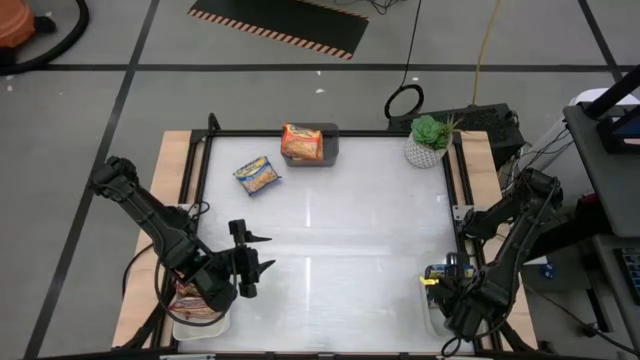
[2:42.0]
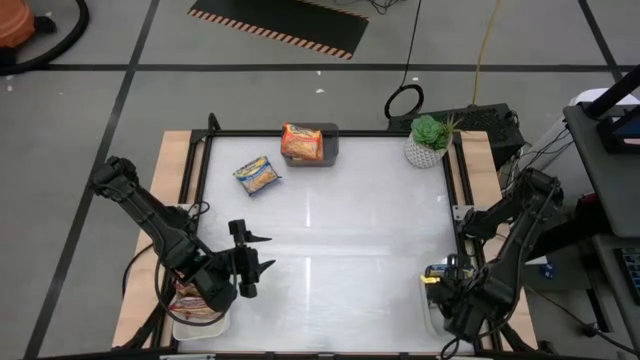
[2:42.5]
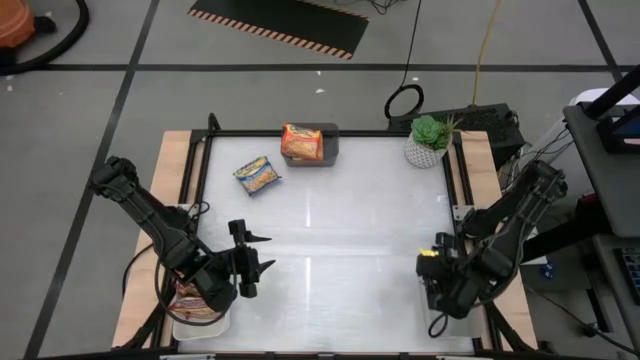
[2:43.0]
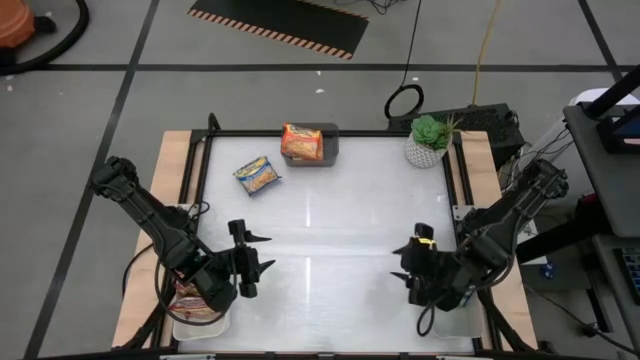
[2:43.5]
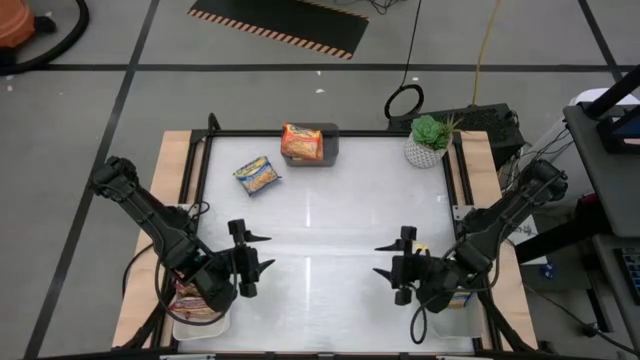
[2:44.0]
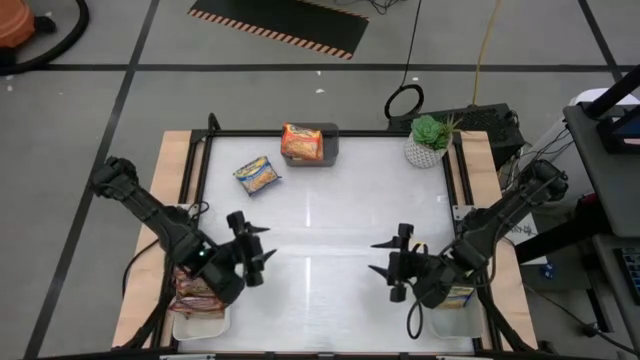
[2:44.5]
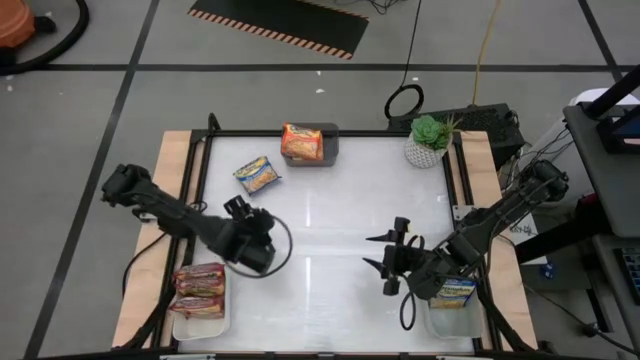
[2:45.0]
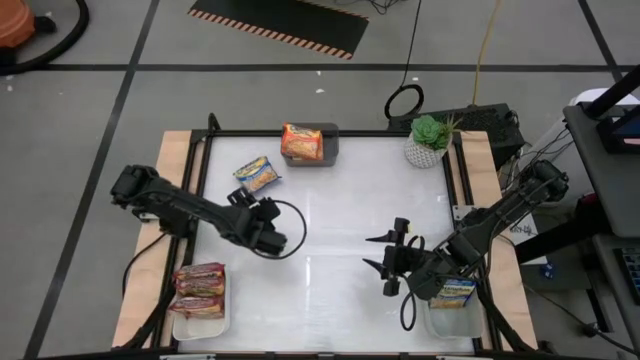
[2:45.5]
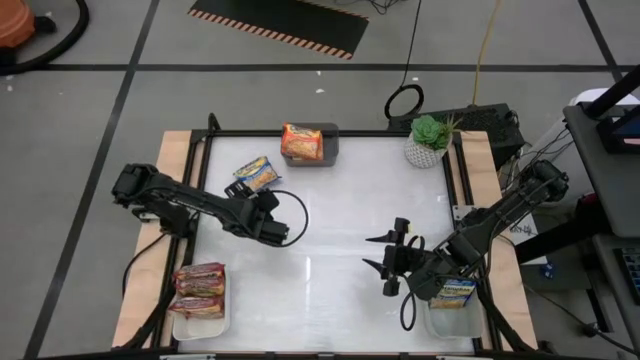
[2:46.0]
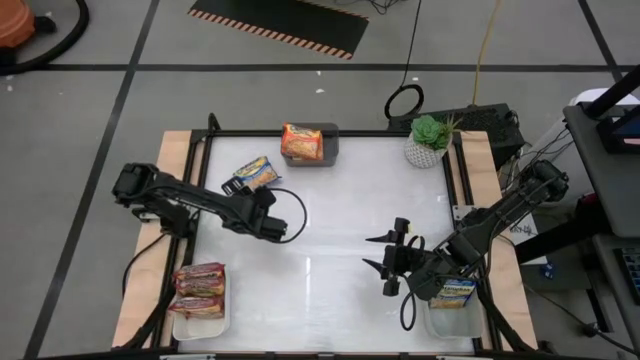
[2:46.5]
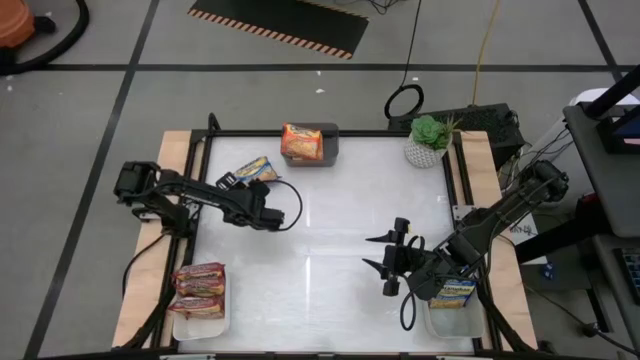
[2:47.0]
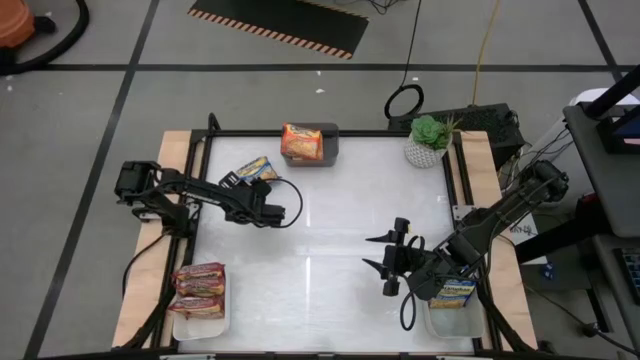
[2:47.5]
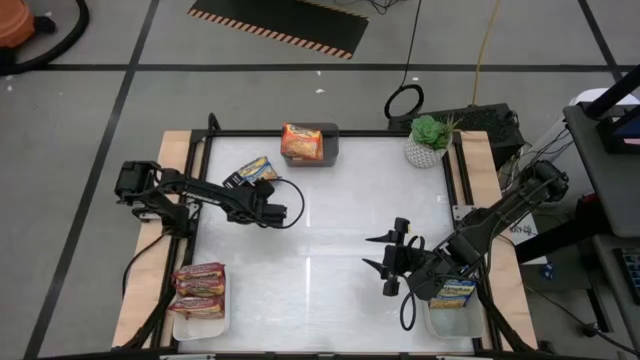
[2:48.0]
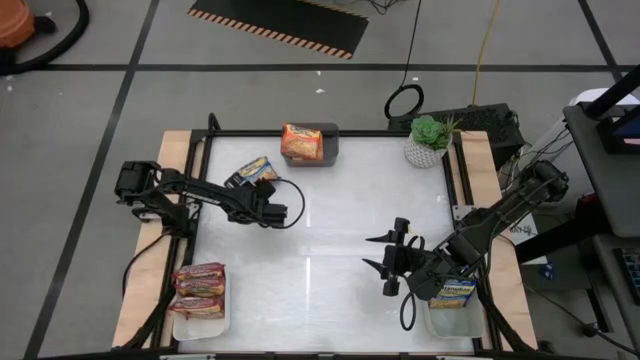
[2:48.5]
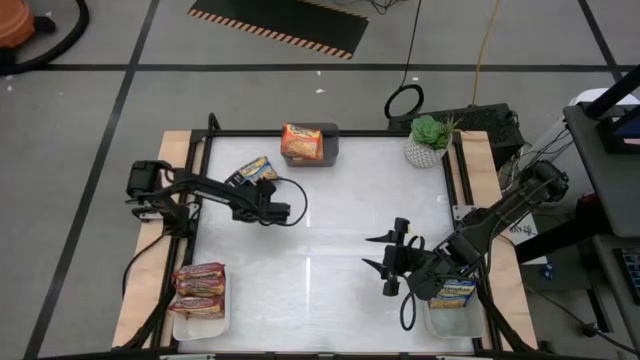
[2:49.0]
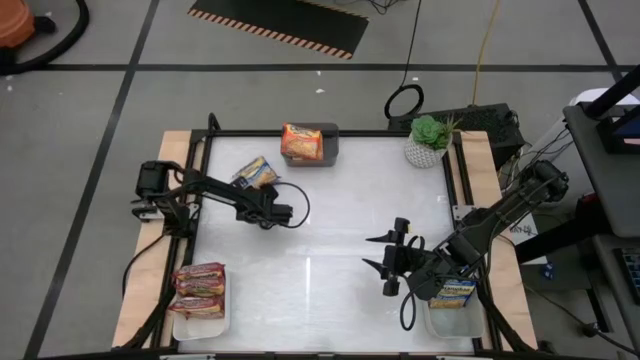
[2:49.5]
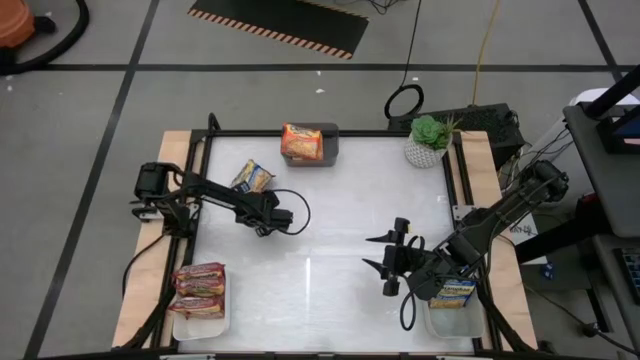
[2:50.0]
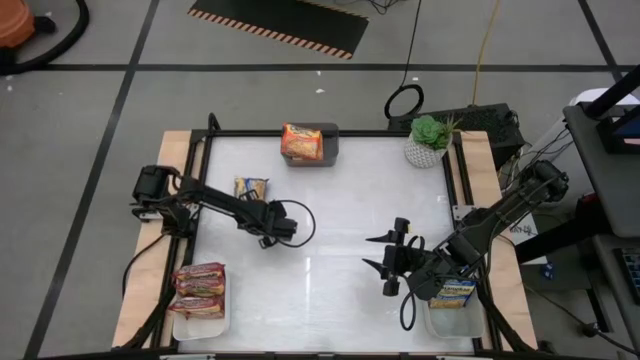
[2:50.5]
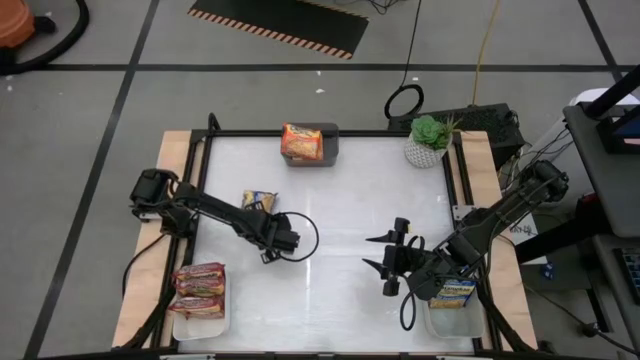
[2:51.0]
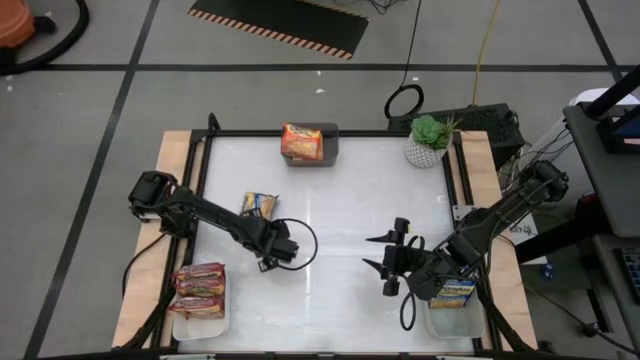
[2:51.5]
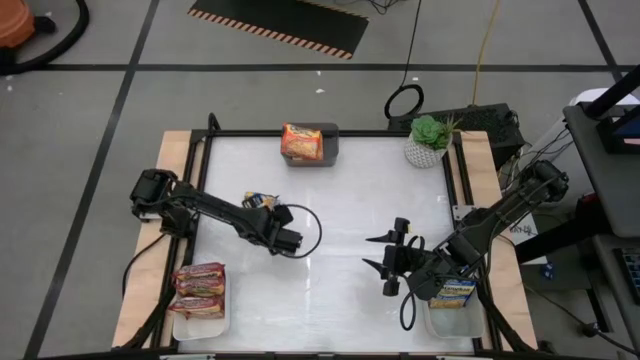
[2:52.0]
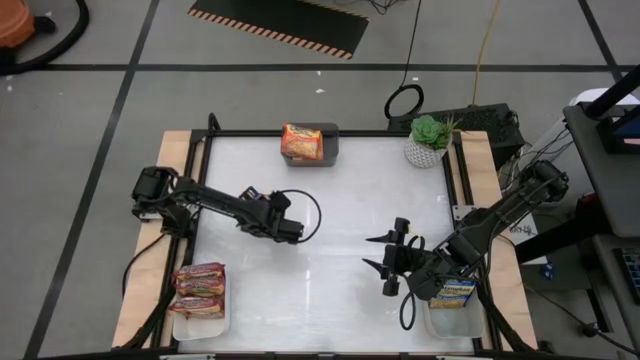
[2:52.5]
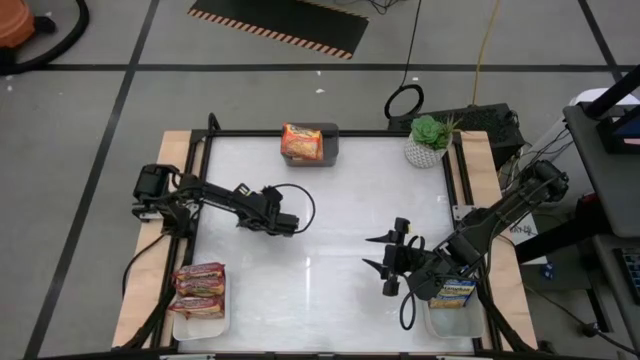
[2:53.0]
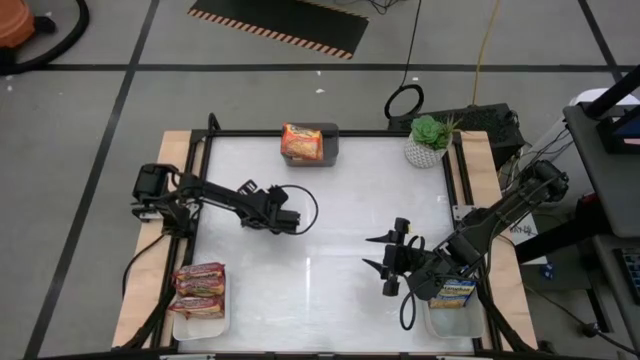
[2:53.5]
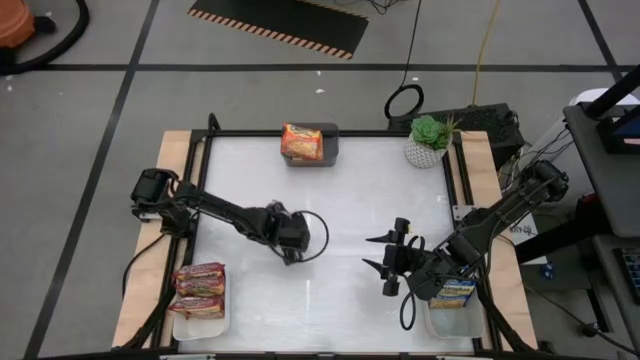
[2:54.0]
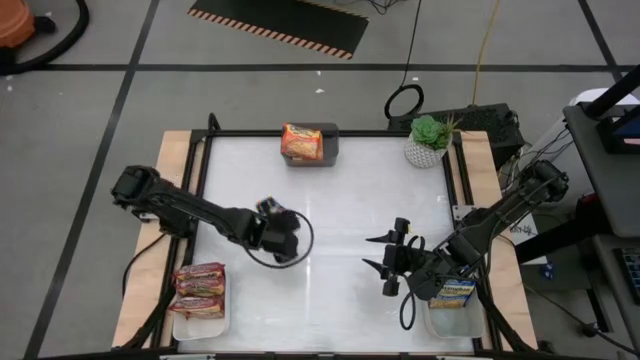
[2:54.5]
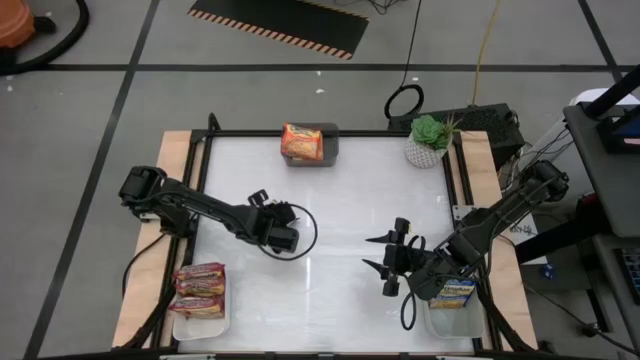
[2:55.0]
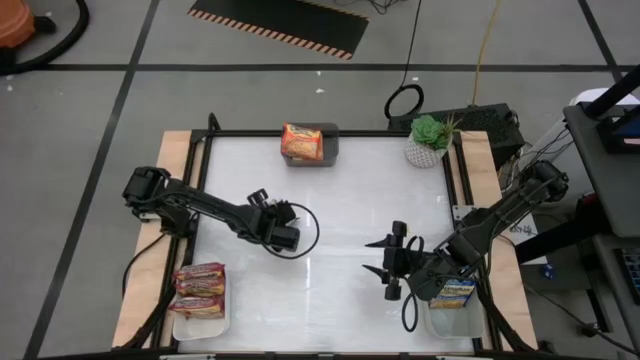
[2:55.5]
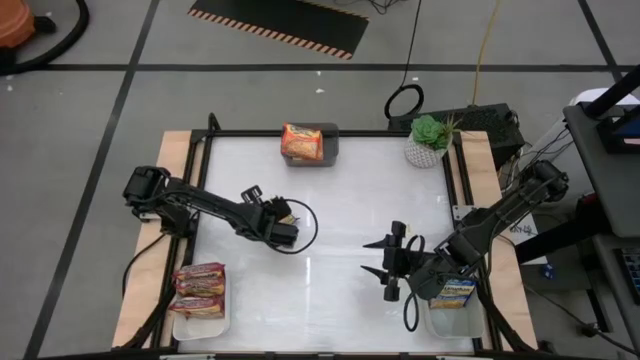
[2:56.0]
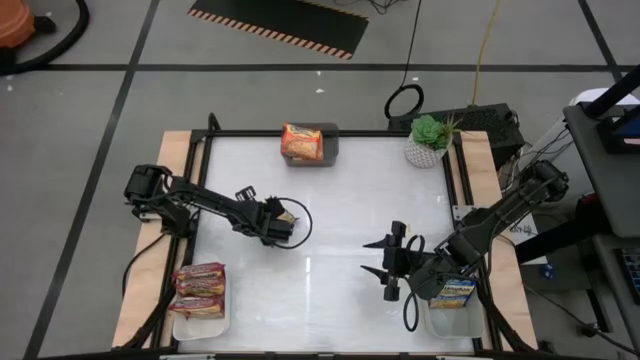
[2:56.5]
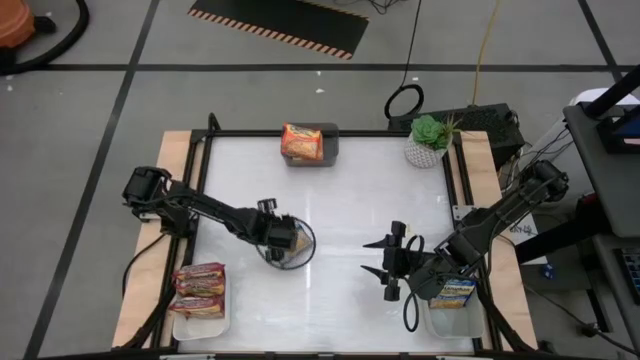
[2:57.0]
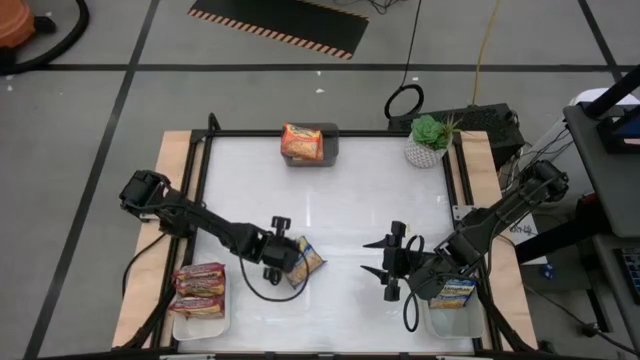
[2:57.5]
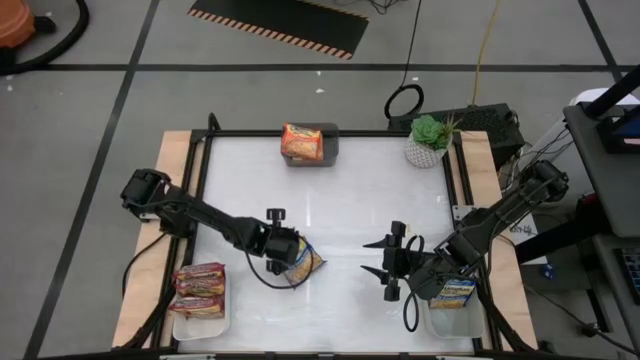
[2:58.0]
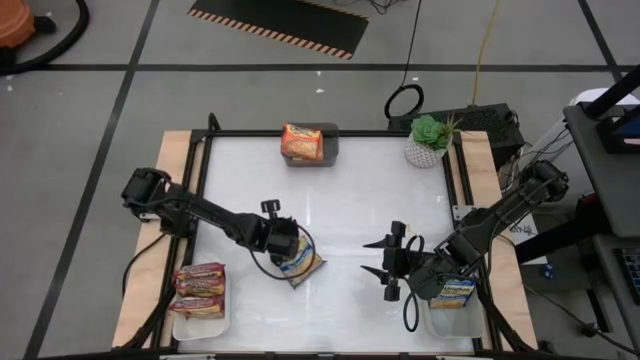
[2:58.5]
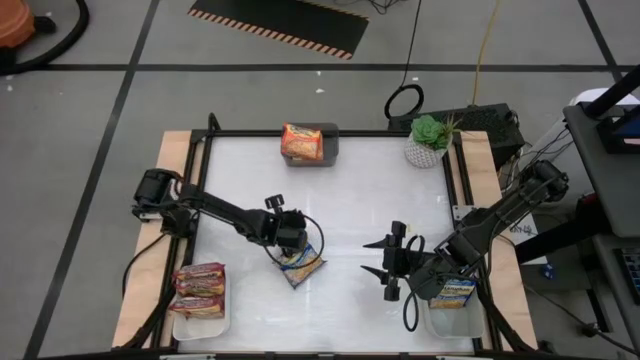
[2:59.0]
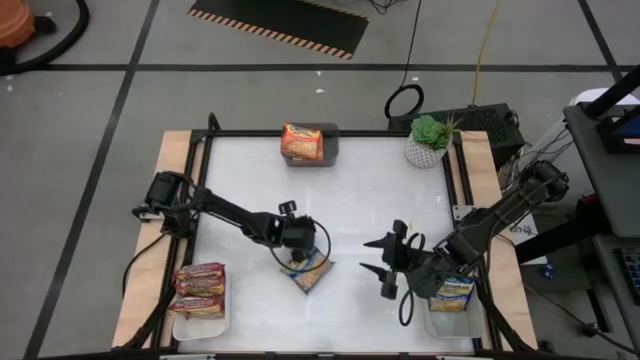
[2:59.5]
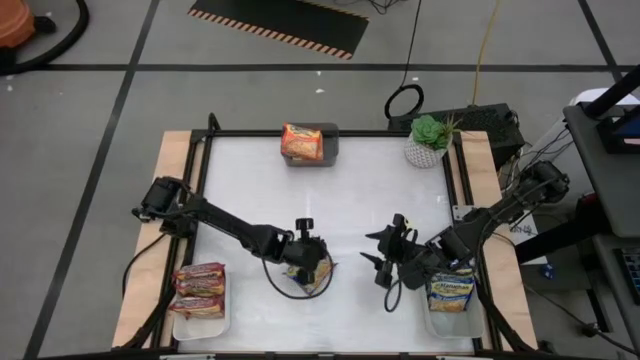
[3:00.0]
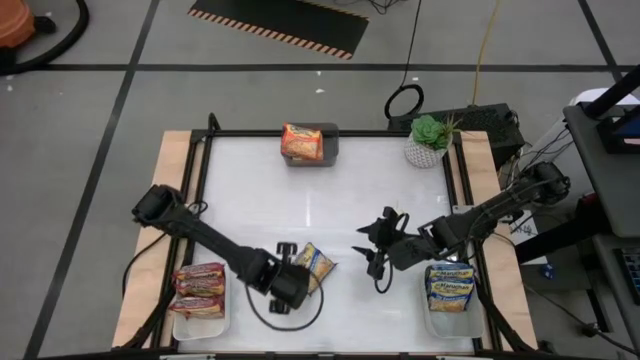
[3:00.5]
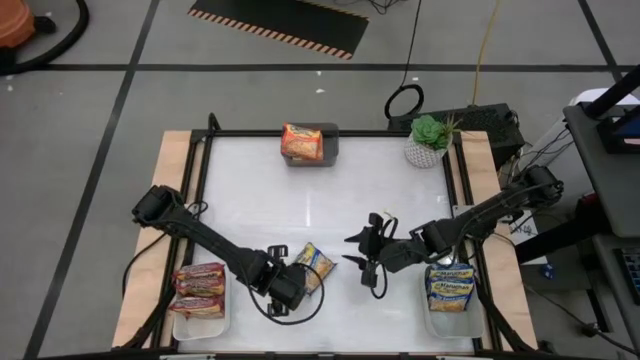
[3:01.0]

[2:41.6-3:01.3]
Task: Sort Maruchan noodles
Put the blue noodle pack into the gray bin

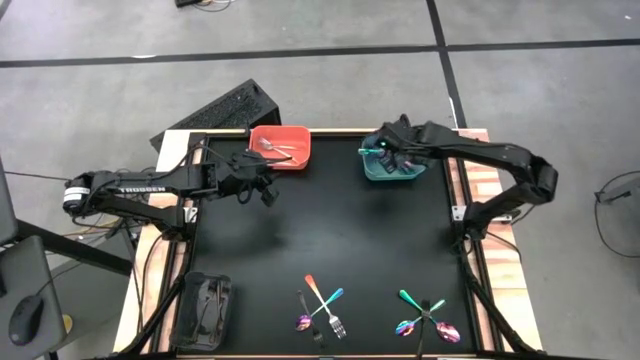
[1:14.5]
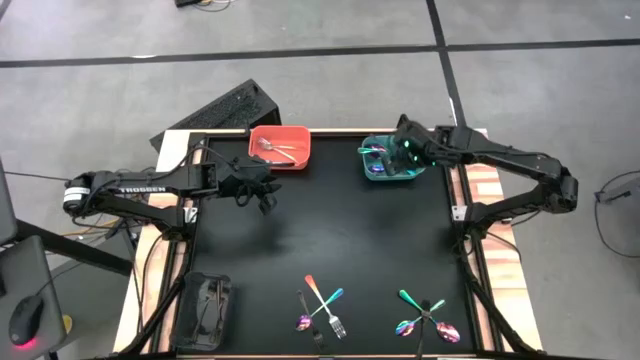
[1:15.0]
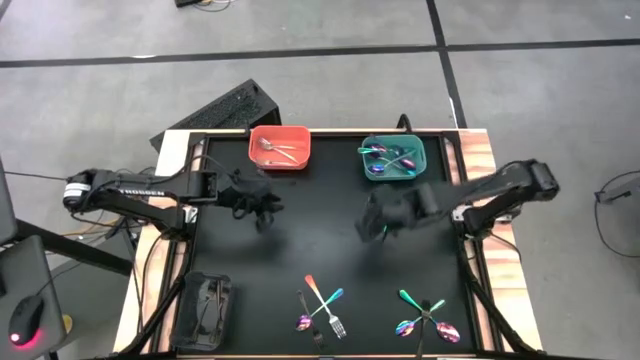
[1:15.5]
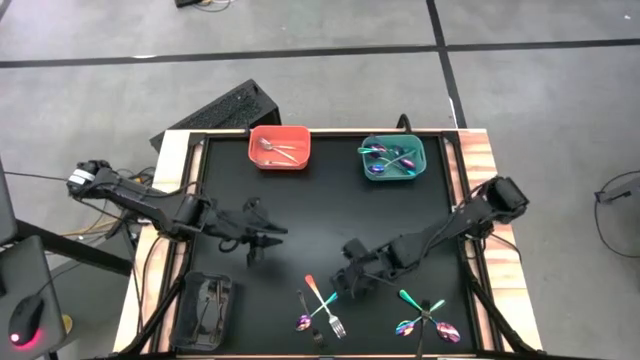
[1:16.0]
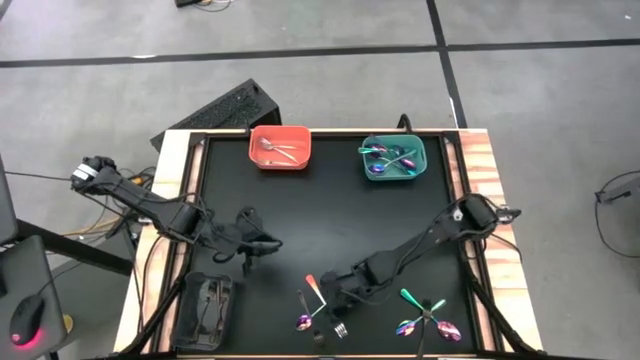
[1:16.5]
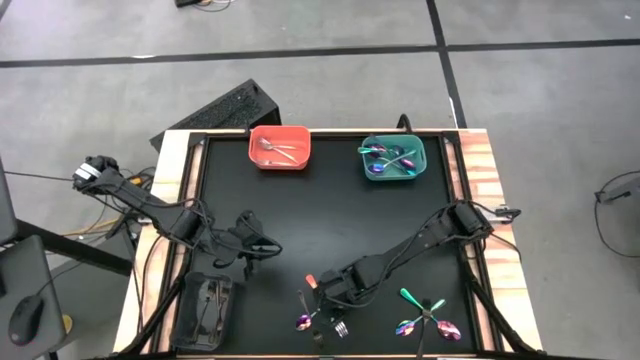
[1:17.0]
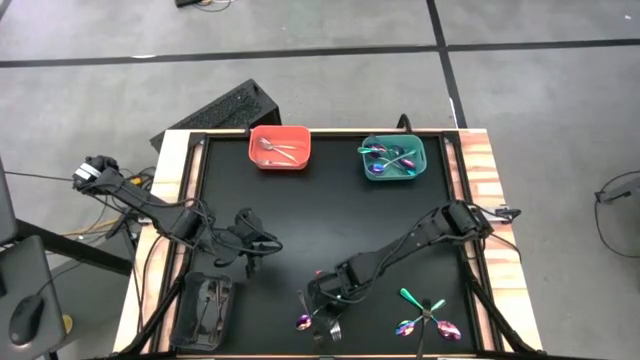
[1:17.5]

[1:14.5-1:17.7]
Task: Sort silverware by color (type)
Put the orange fork into the orange bin
